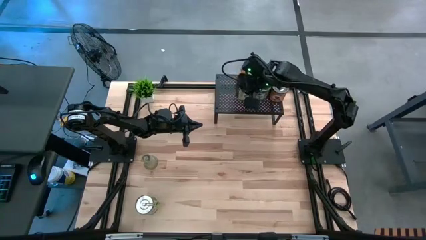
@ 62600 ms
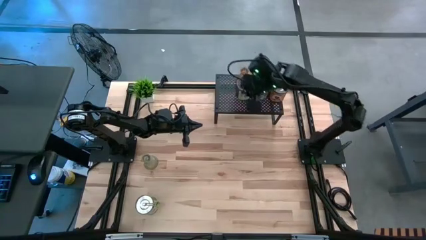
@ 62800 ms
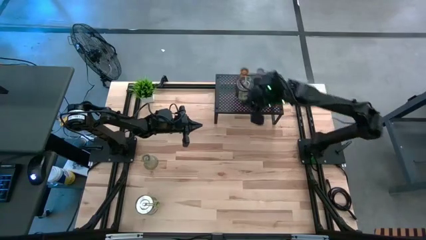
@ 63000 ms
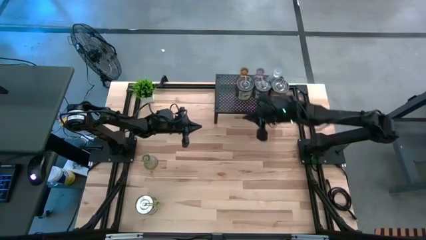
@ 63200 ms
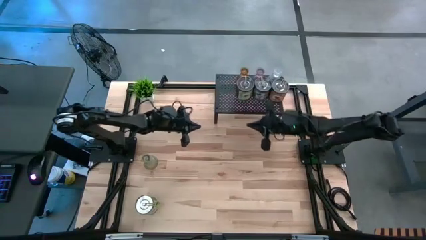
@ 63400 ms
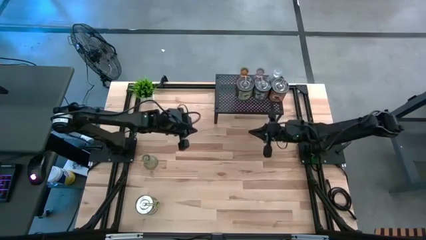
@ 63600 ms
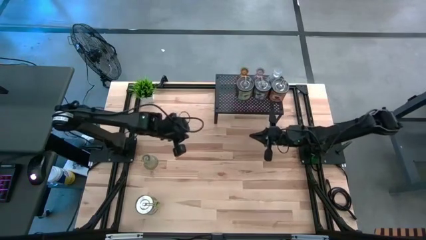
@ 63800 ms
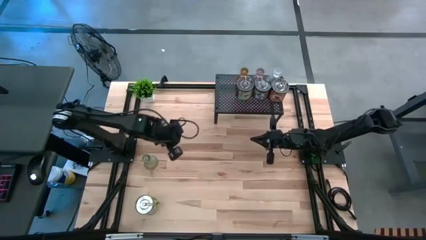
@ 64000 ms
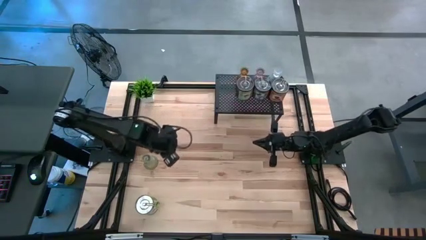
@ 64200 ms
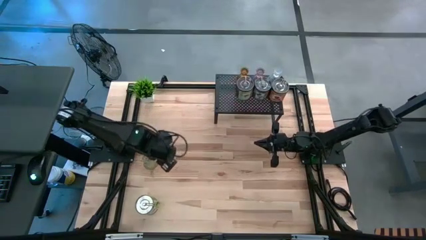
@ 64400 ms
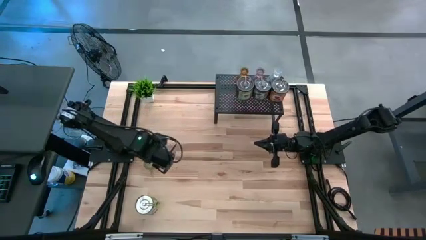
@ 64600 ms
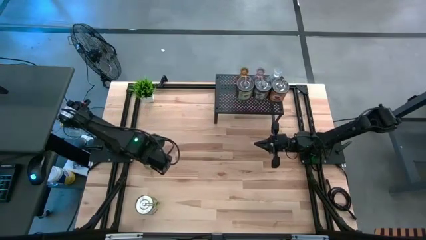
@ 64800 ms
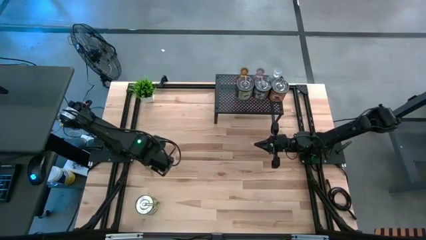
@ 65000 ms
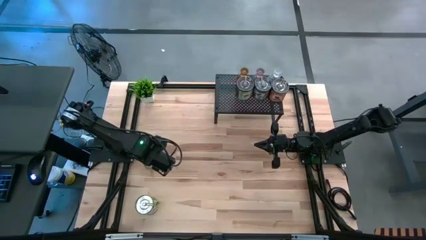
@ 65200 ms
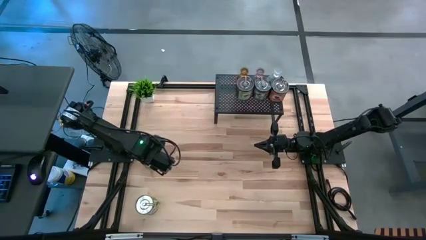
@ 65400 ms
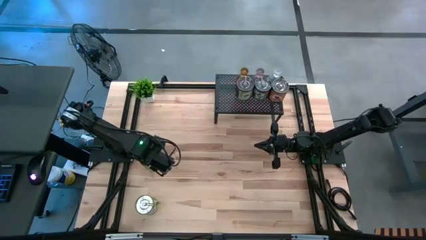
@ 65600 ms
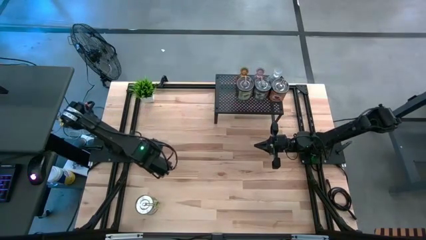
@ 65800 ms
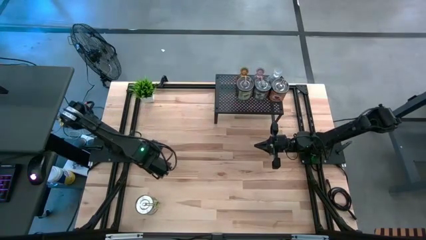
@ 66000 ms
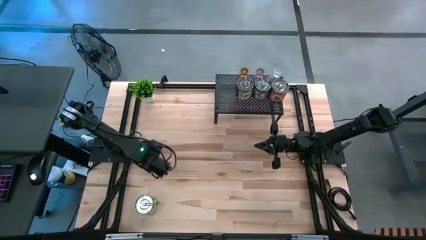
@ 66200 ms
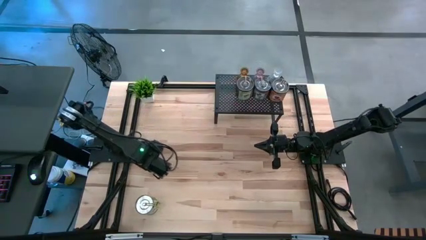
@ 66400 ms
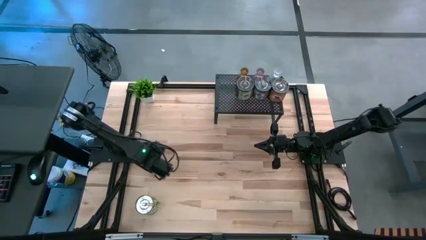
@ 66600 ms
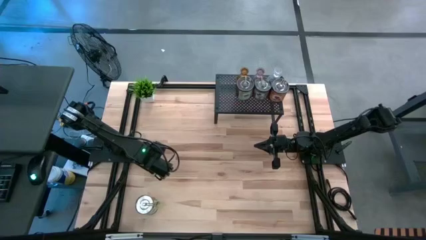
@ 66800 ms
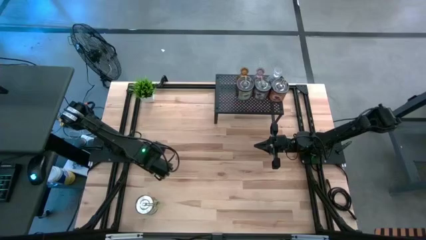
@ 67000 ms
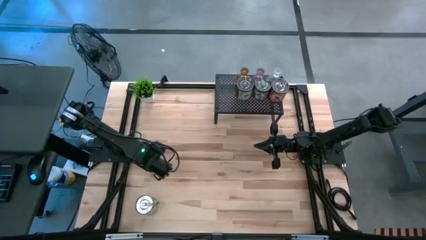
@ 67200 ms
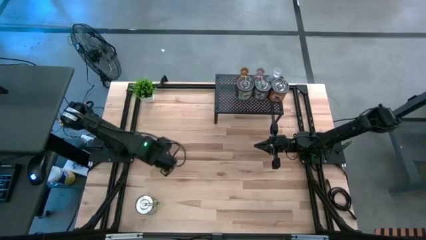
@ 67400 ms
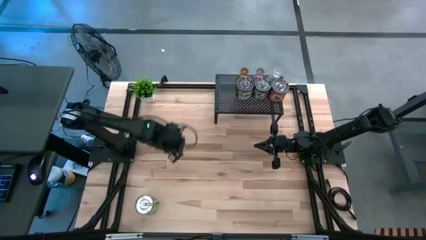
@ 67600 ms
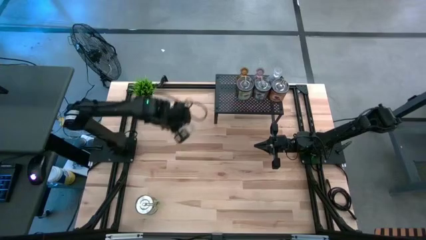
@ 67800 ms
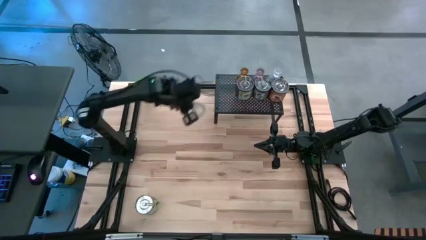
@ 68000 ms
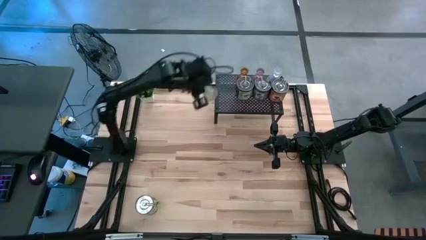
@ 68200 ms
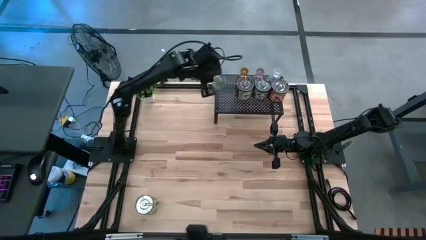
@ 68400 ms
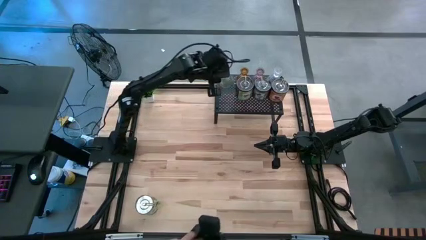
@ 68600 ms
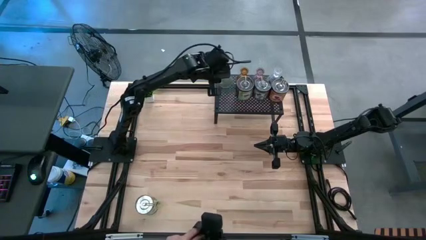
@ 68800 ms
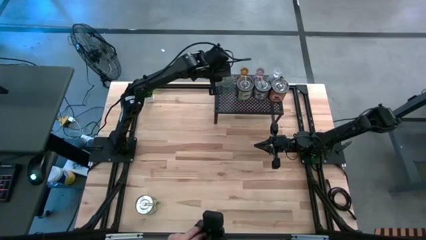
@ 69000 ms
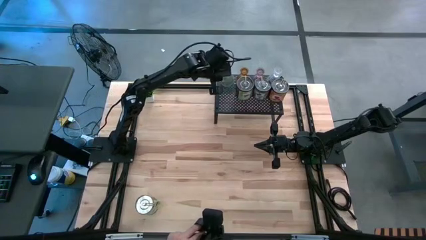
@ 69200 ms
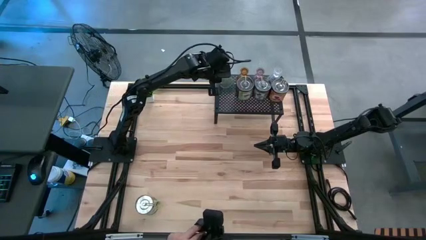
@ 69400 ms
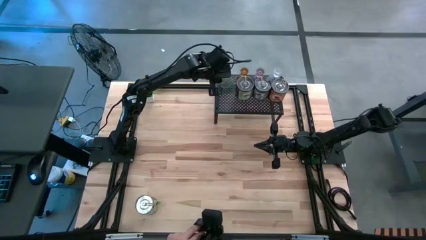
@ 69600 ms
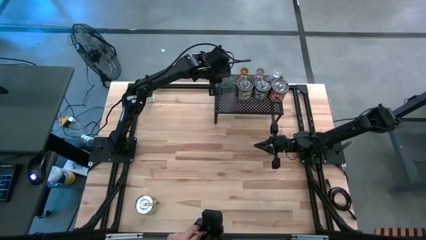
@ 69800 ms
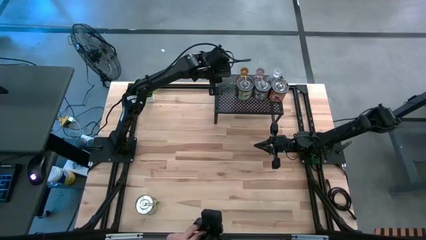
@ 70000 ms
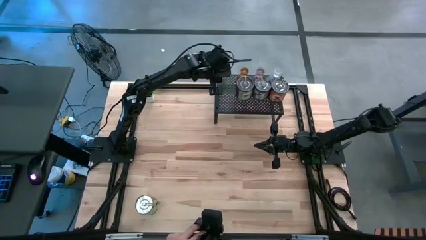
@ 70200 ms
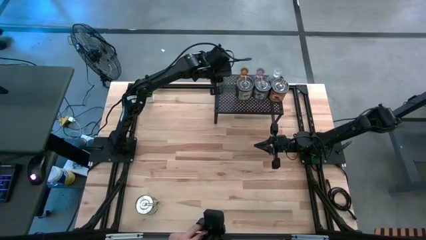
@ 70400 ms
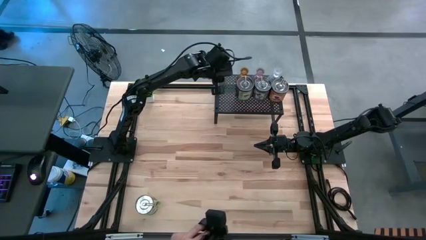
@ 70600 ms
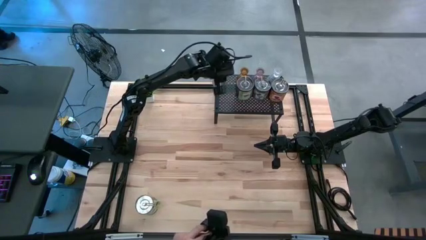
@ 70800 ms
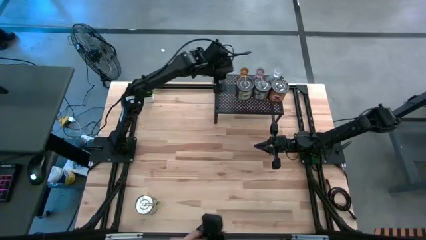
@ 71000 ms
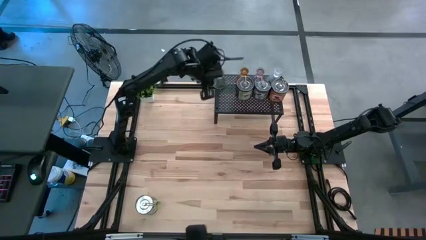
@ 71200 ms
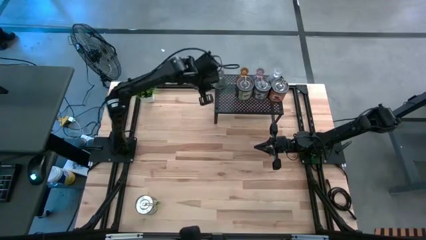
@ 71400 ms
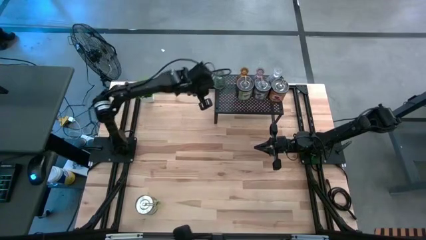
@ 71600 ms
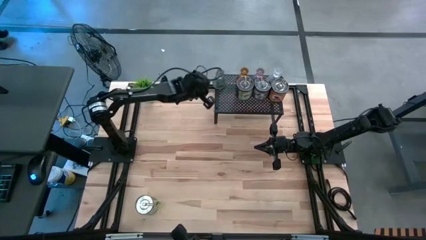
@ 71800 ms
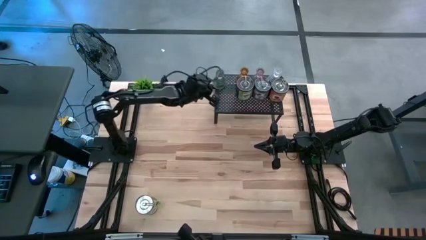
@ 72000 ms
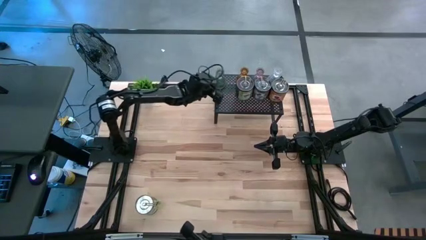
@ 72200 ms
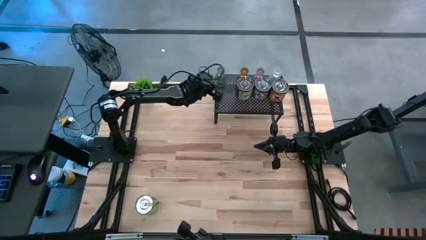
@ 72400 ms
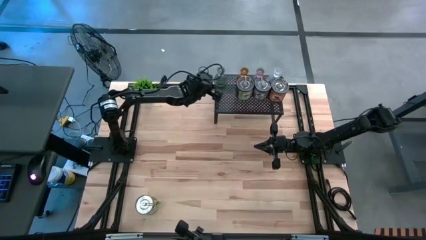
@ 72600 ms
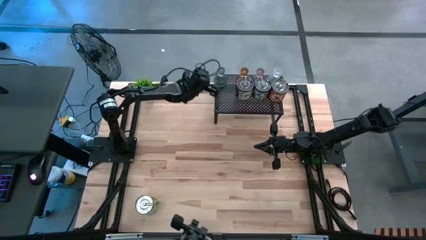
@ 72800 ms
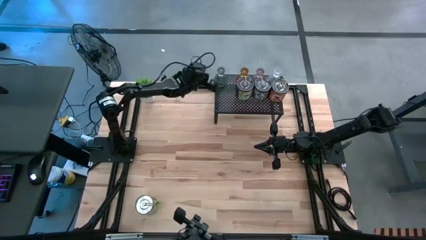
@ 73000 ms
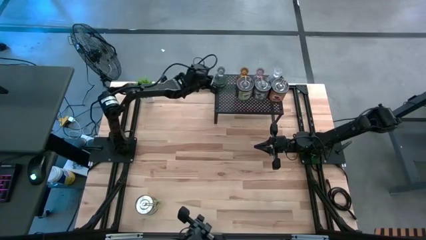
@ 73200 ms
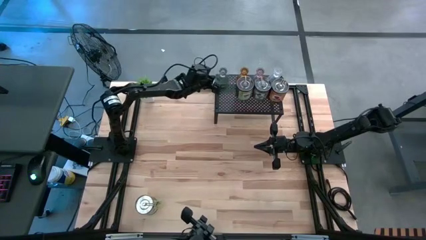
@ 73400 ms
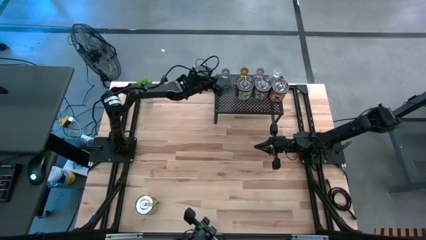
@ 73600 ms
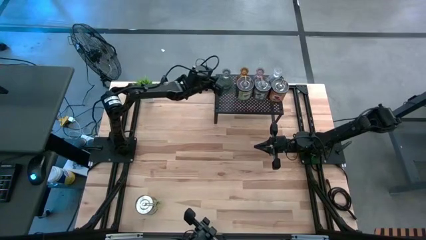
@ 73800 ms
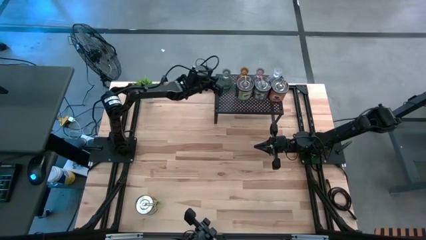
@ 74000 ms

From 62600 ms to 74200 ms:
Task: Pick & Place candle stick holders
Put the green candle holder on the shelf aligned with the orange candle holder

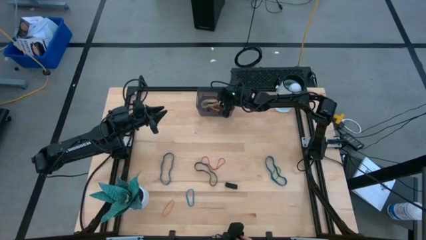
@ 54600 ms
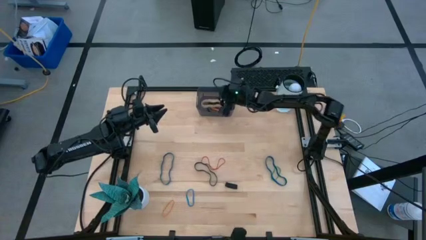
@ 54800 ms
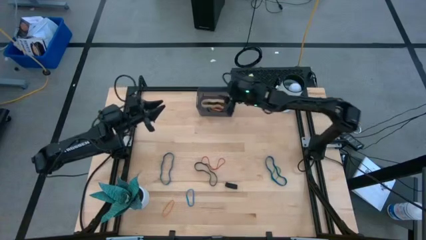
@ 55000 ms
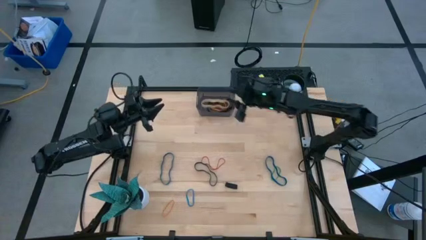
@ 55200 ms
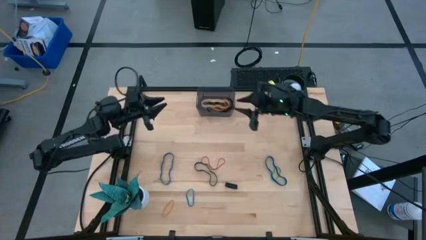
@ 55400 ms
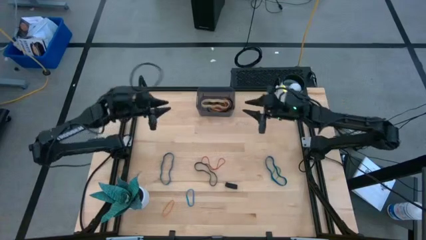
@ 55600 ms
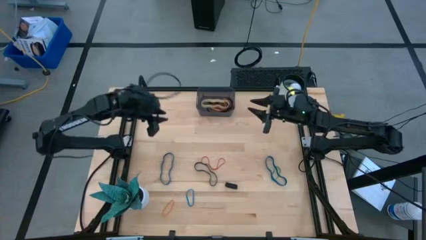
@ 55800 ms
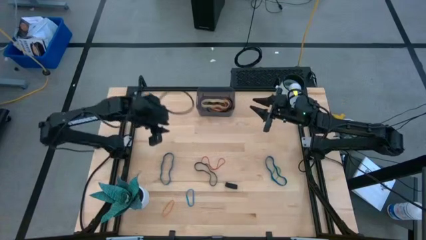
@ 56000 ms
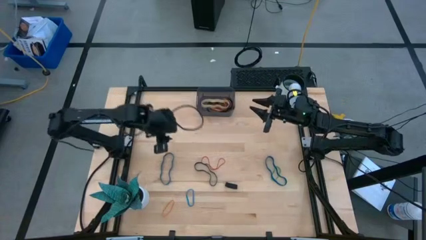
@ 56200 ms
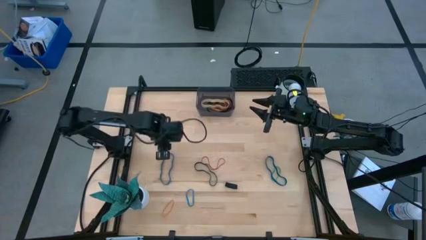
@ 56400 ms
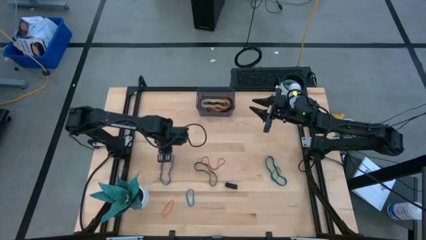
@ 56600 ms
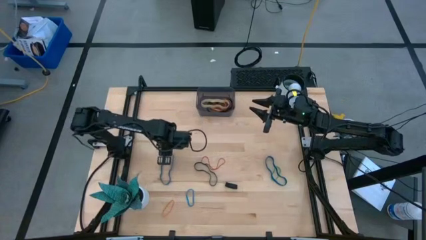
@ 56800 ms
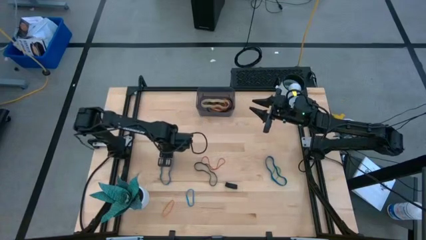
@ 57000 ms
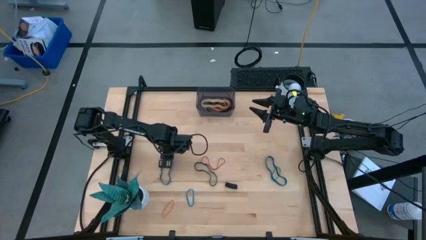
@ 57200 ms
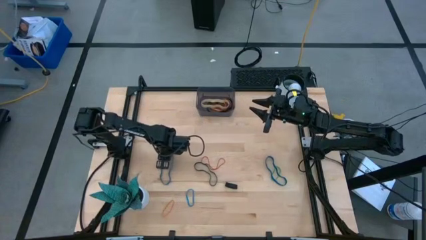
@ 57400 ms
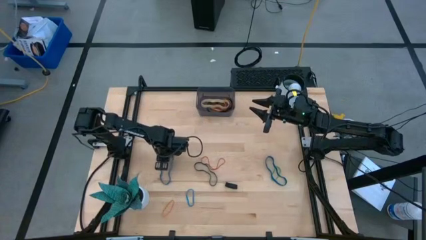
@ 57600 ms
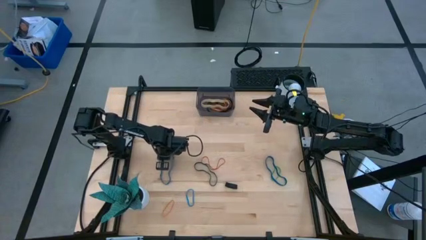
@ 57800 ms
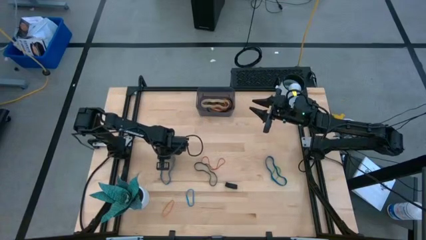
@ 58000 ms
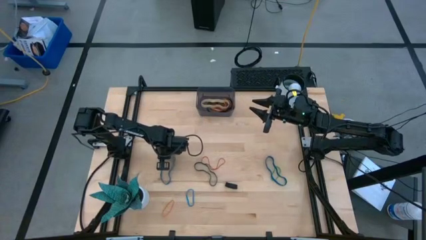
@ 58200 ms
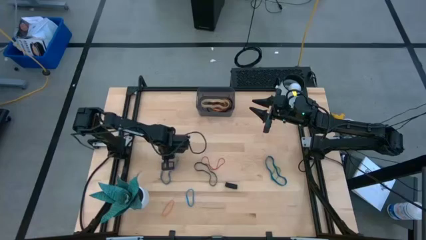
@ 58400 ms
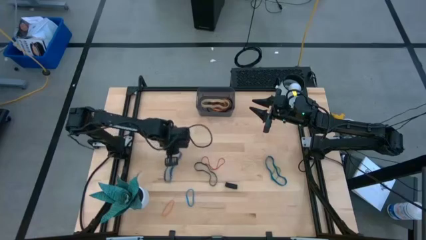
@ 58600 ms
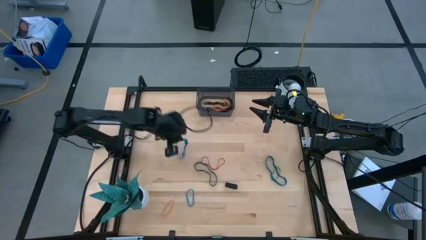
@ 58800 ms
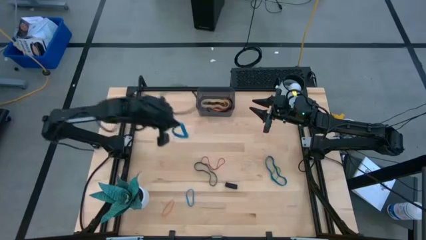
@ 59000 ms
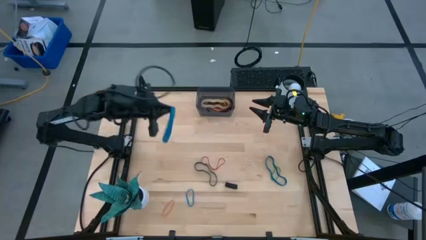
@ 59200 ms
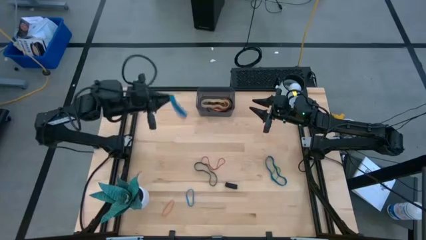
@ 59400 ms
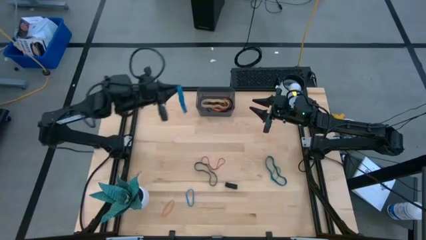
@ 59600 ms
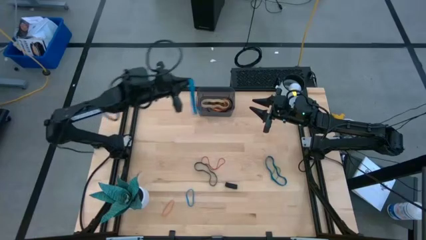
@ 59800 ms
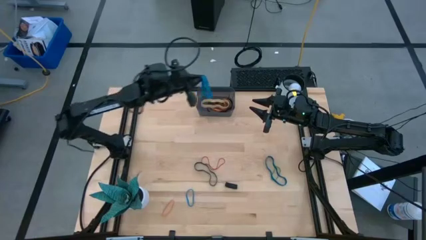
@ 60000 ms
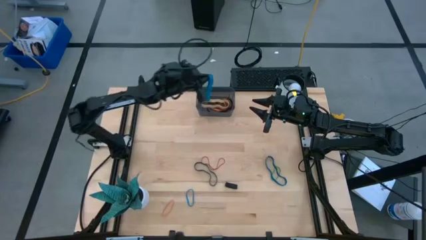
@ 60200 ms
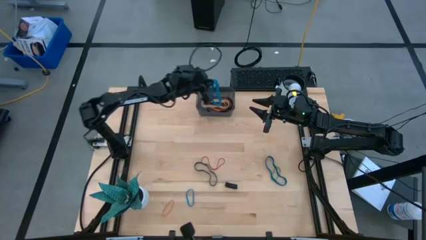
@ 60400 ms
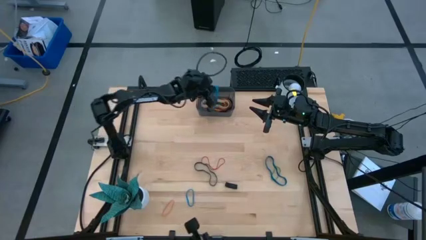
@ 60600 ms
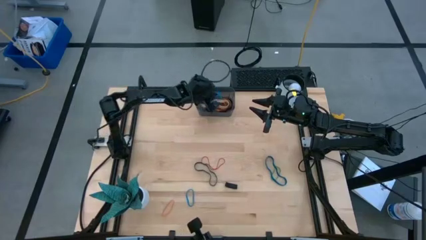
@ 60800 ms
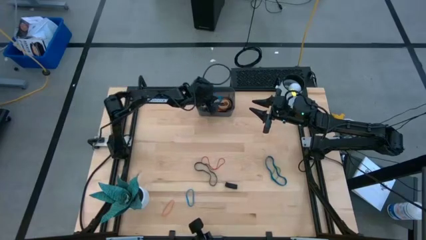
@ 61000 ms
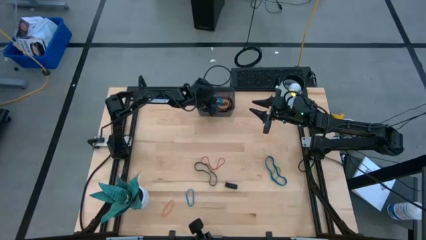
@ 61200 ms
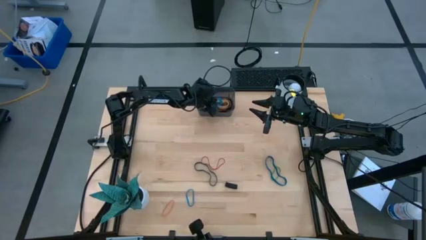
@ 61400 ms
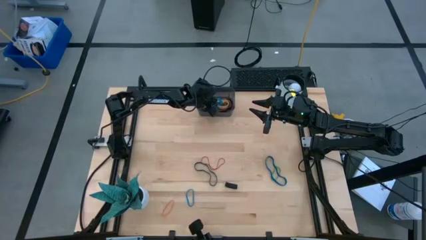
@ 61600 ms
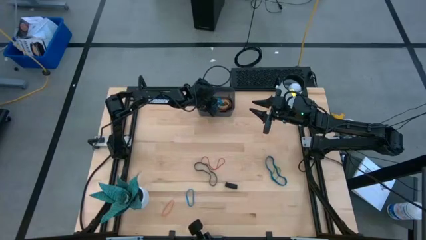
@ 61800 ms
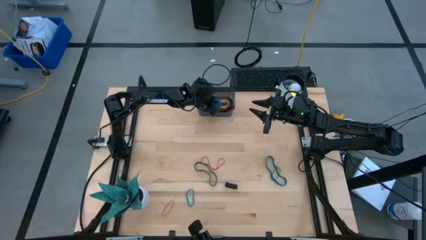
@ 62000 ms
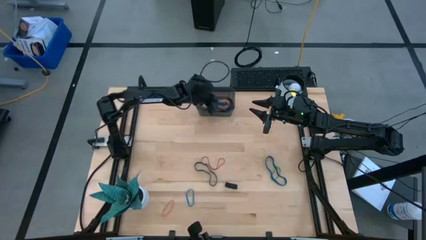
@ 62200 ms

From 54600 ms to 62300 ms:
Task: Pick and place rubber bands into bin
Put the top left blue rubber band into the black bin
